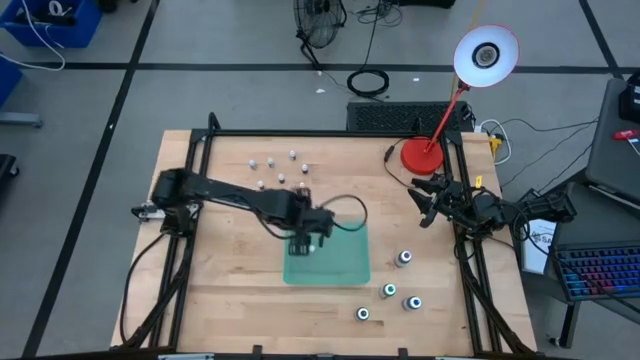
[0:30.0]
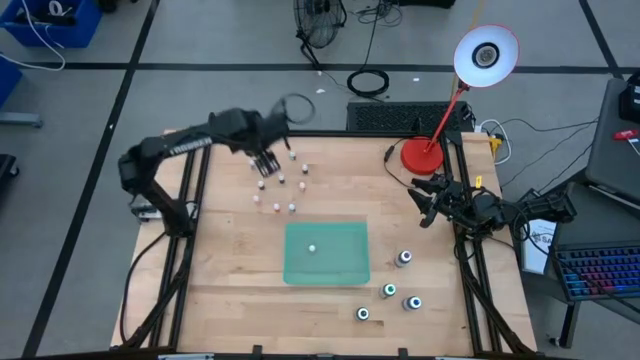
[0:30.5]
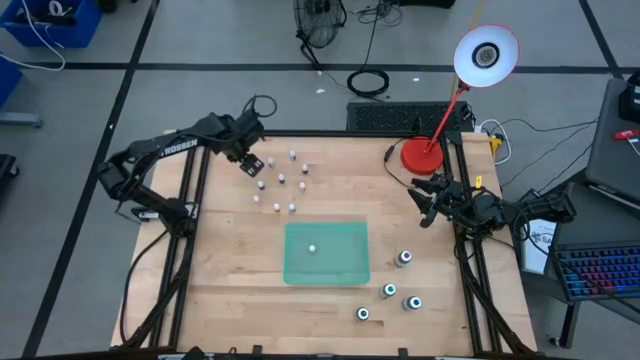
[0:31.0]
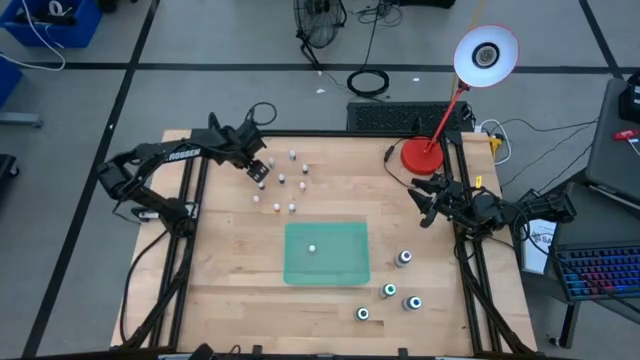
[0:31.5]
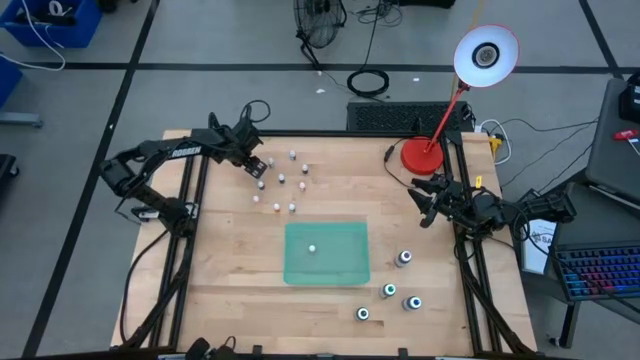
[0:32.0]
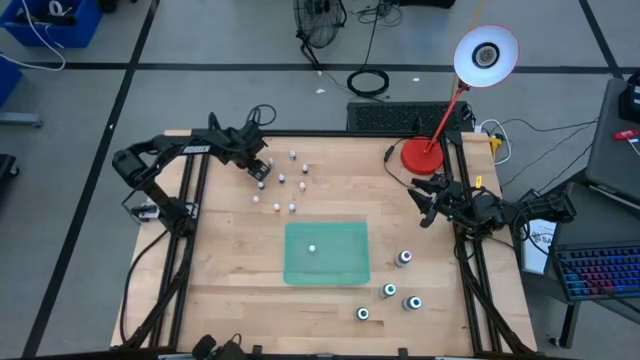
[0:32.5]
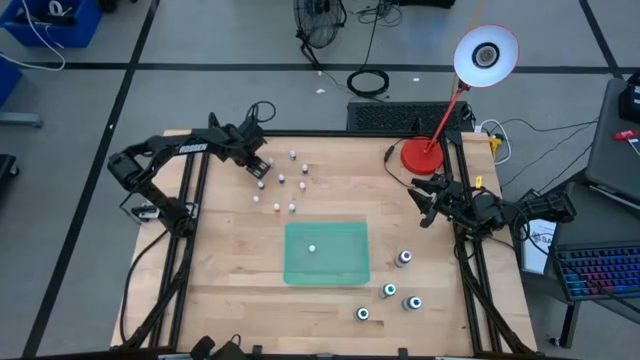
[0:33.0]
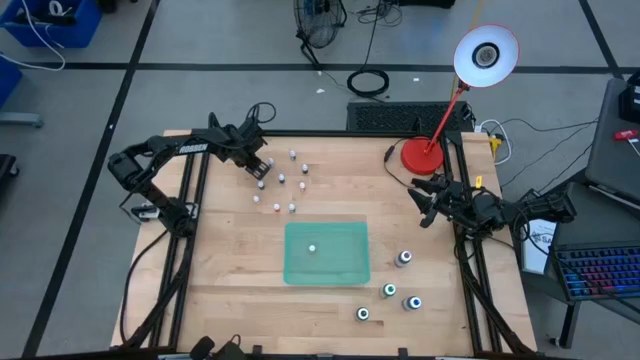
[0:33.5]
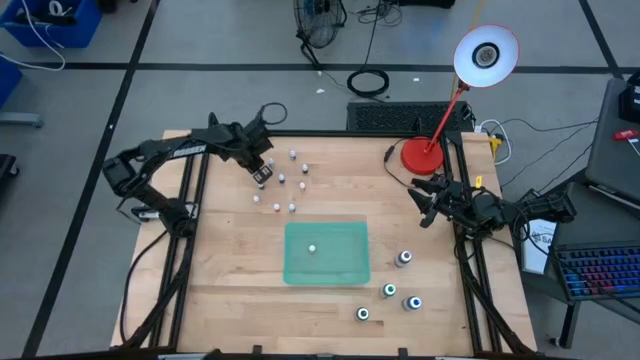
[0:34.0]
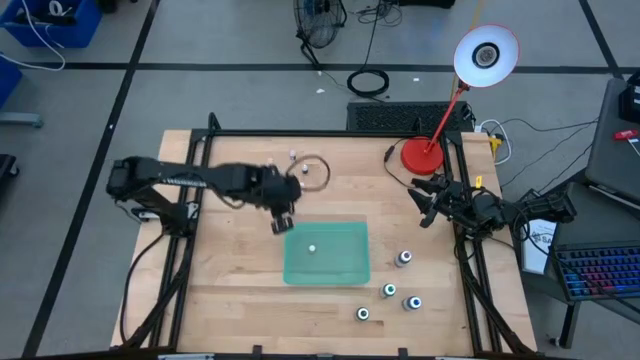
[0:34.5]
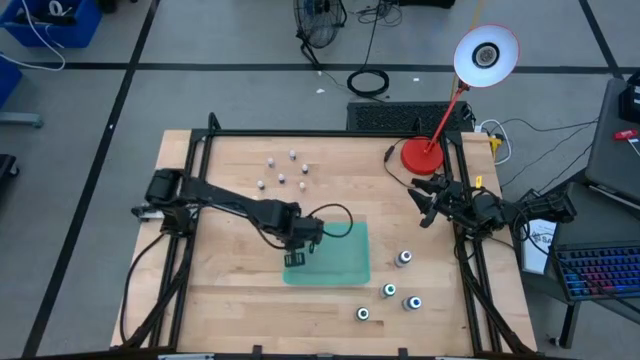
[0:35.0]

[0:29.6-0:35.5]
Task: Pick & Place food coloring
Put the small green food coloring bottle into the blue bin

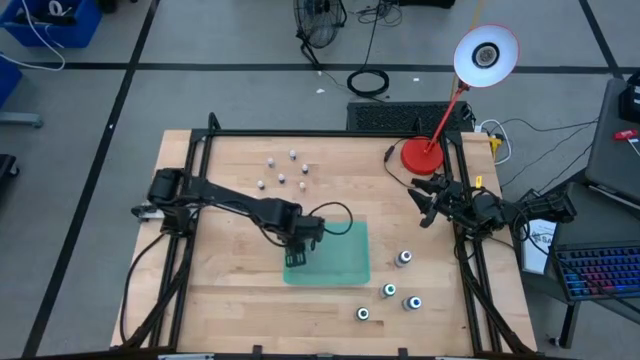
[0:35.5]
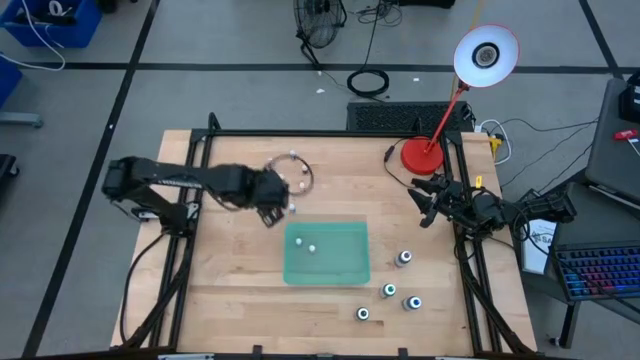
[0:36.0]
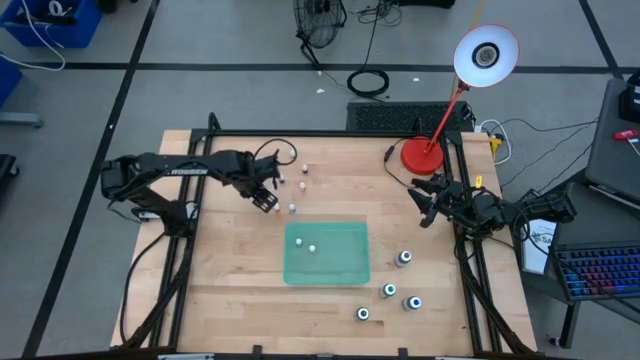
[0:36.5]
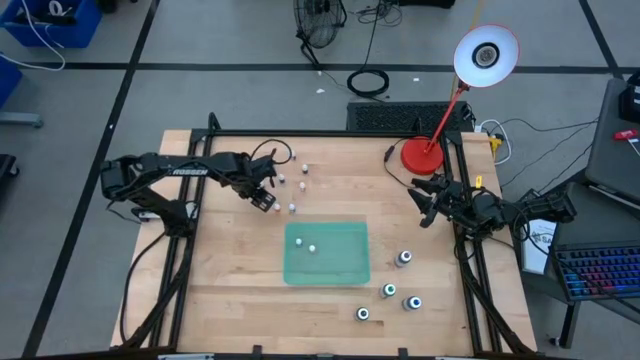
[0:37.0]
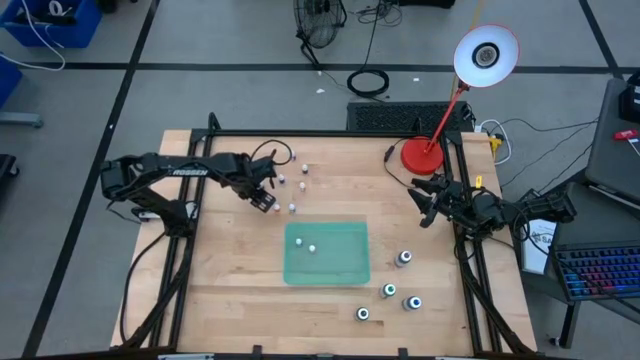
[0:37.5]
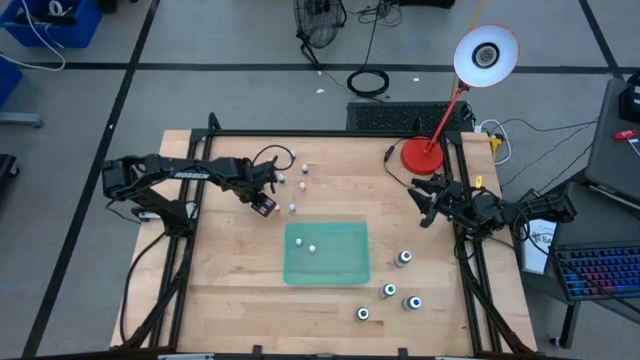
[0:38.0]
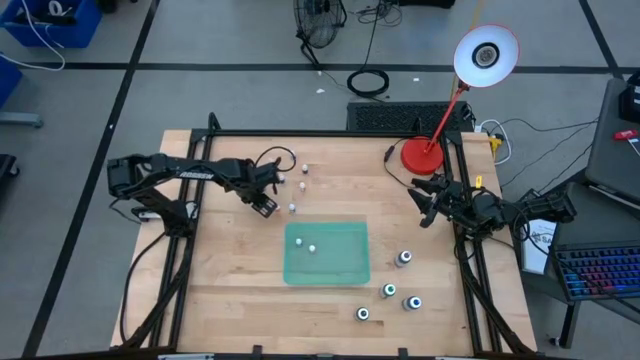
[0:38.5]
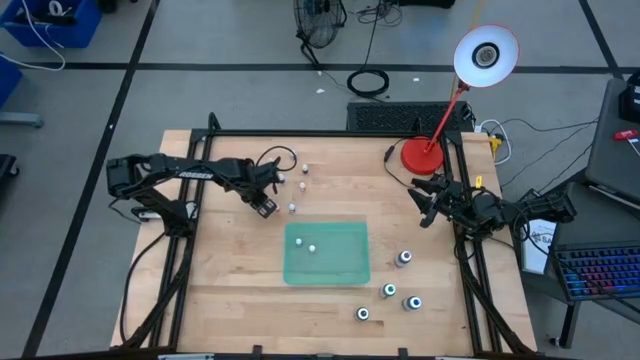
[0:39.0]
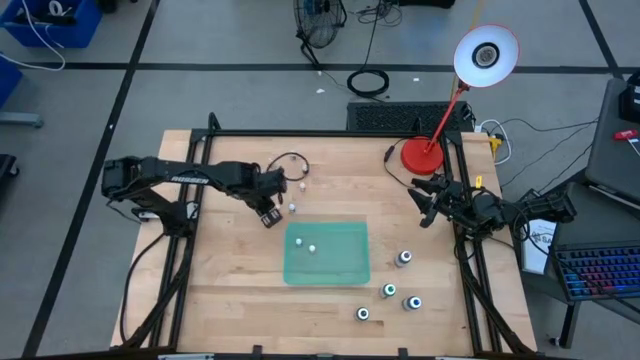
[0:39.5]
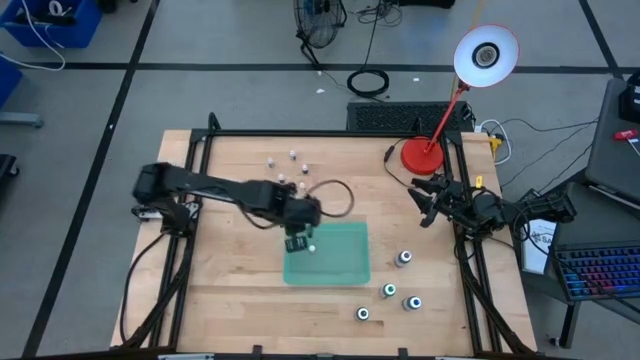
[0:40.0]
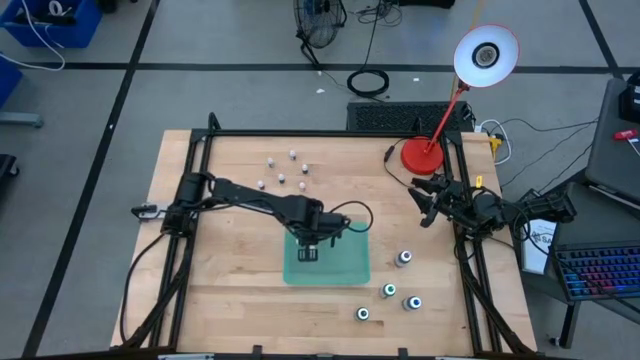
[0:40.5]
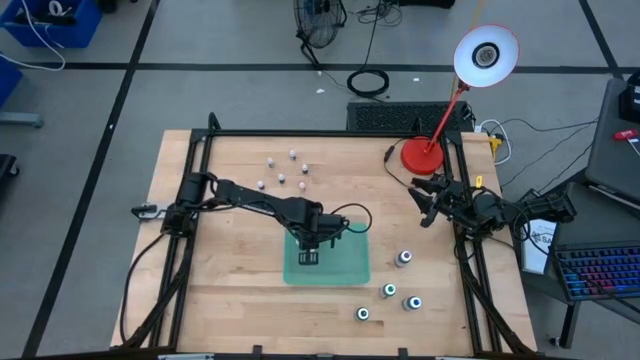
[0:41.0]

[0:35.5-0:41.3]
Put the small orange food coloring bottle into the blue bin

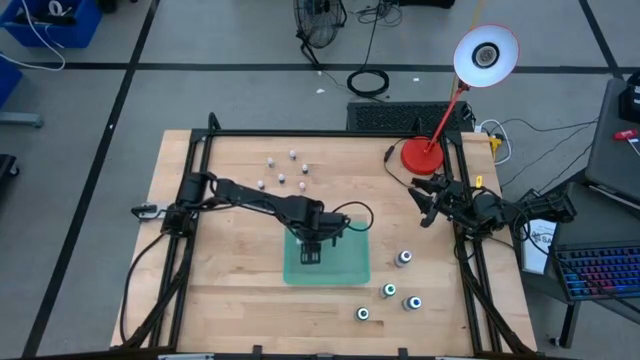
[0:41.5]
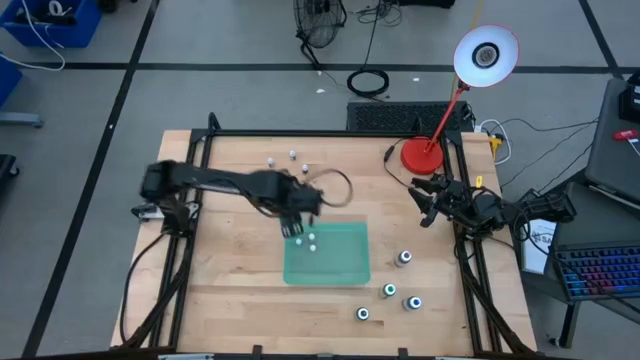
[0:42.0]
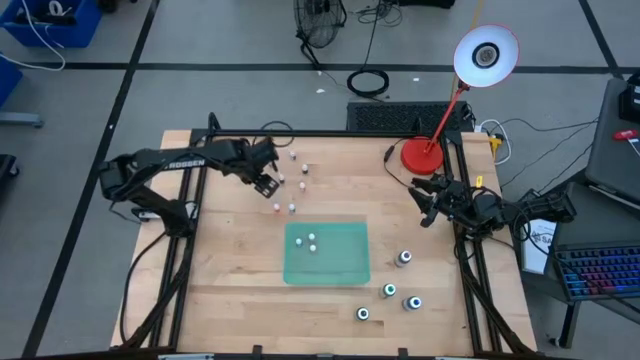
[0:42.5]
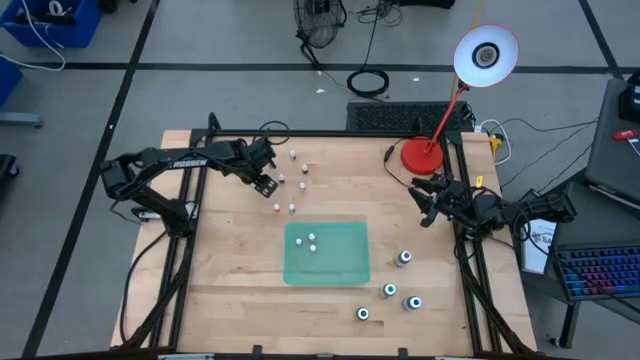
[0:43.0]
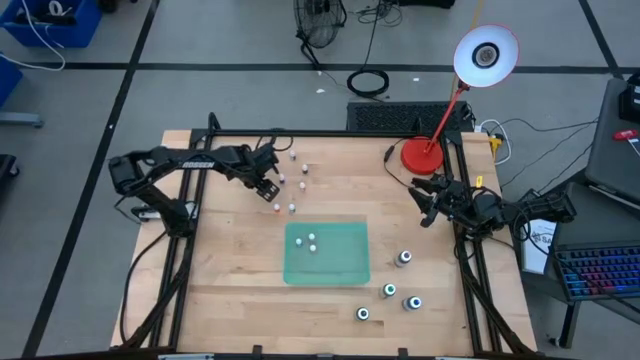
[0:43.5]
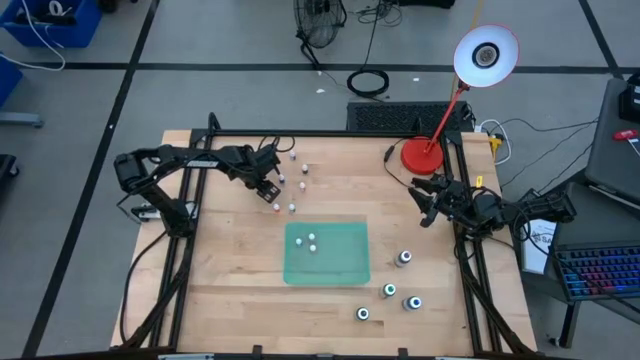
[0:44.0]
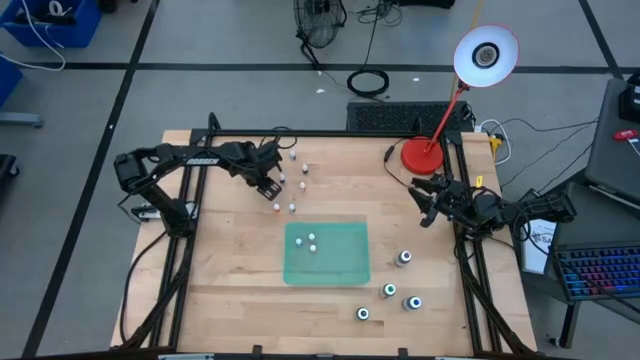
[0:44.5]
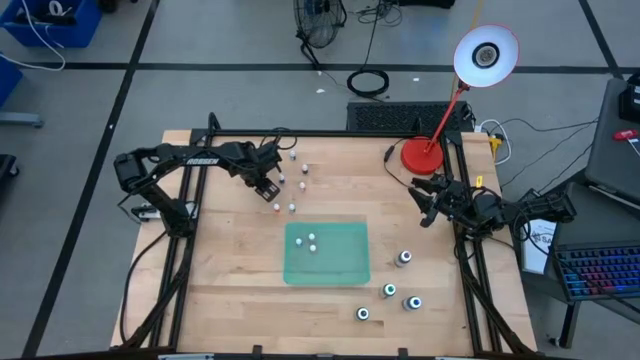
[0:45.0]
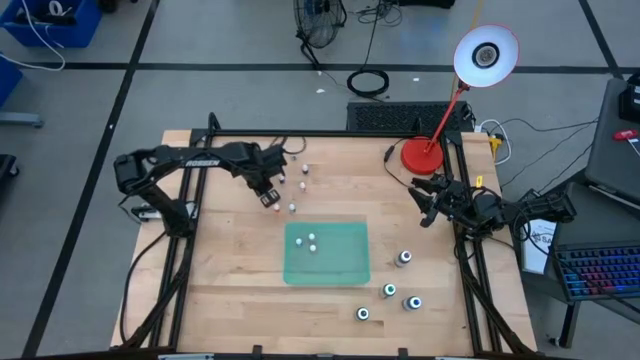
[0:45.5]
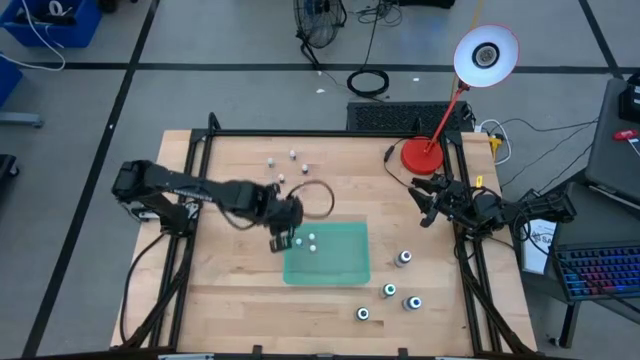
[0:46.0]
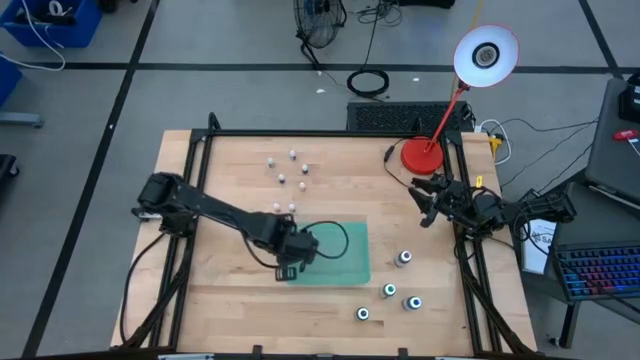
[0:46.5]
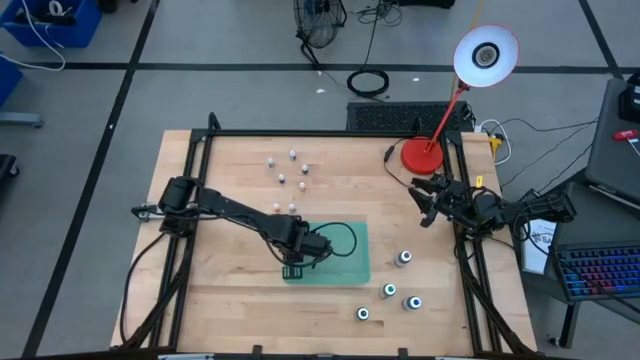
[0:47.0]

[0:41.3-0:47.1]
Put the small red food coloring bottle into the blue bin

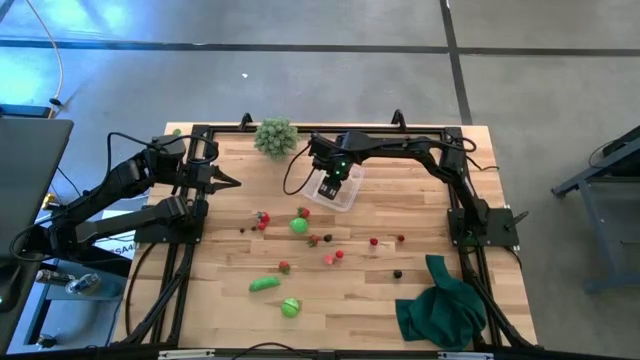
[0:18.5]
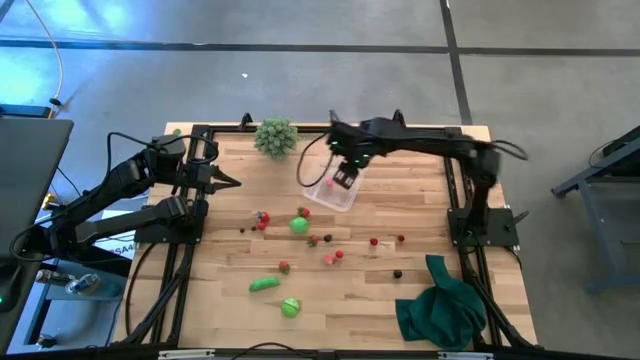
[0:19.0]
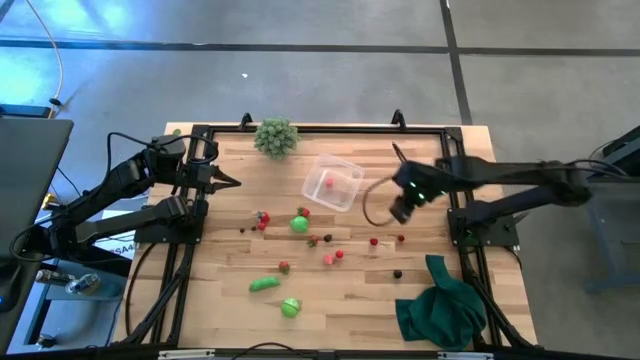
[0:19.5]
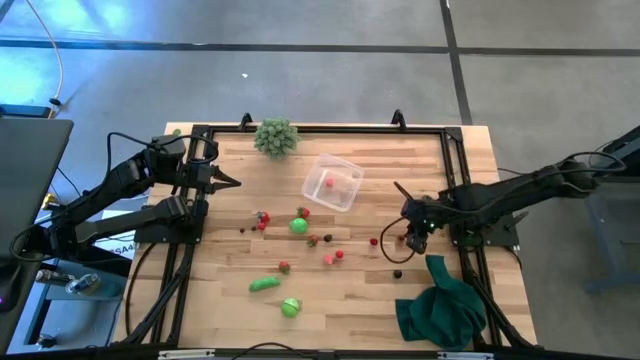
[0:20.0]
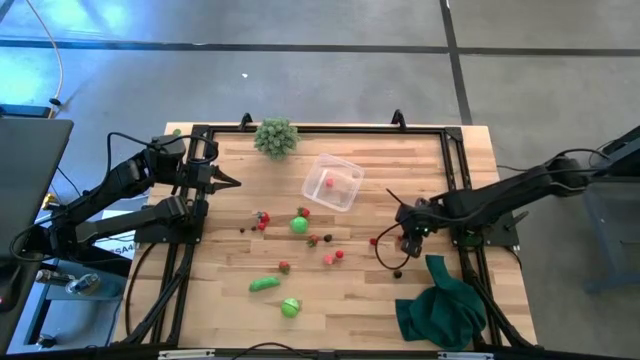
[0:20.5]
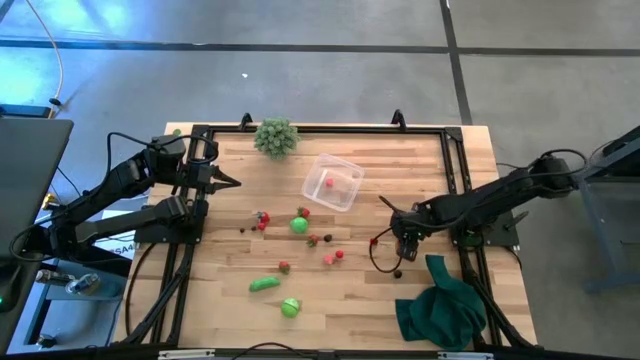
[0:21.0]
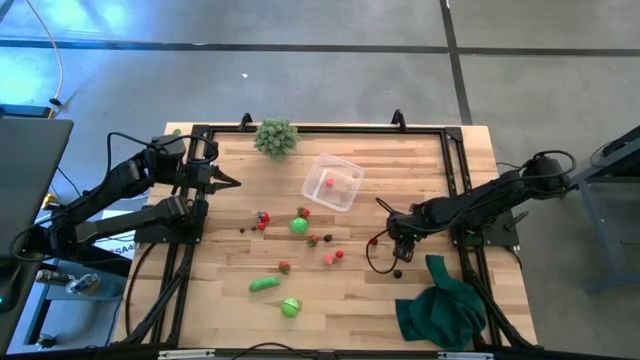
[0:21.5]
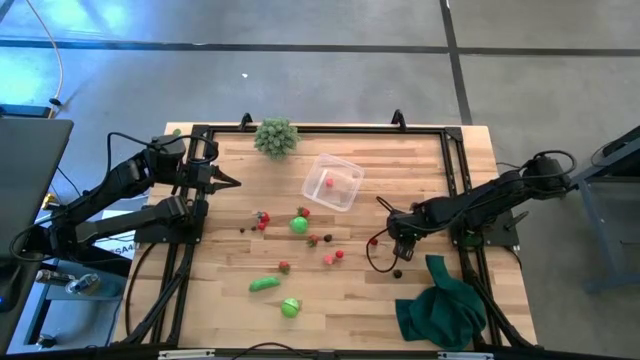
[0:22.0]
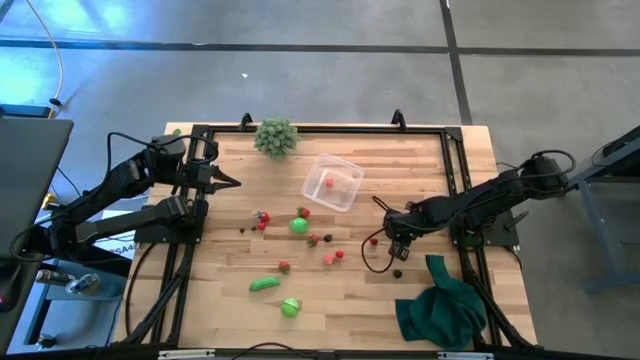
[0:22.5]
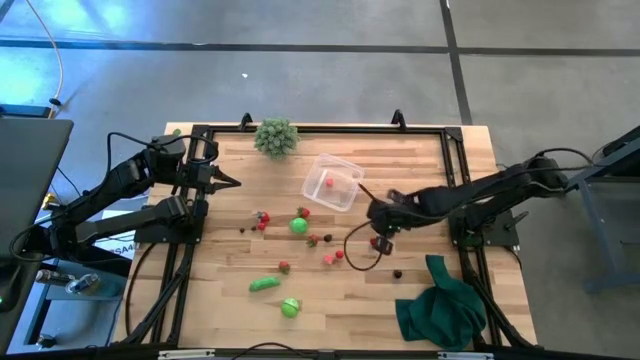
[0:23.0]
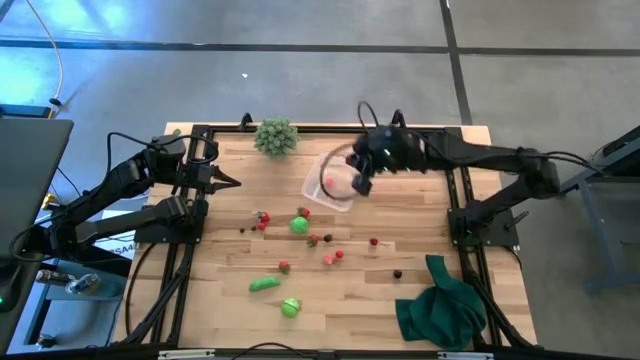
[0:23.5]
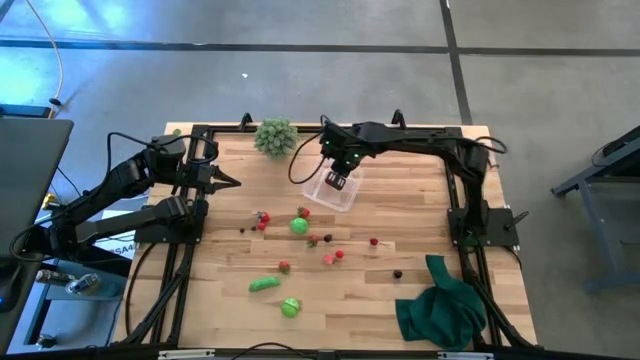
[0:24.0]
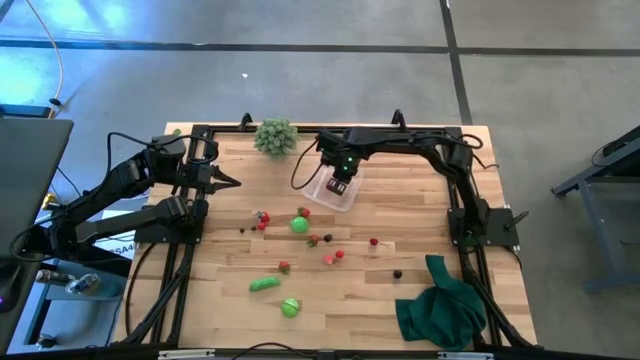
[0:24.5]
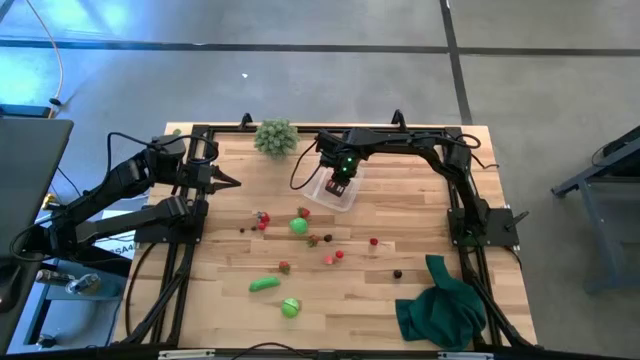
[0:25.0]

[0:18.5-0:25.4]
Task: Pick and placing Produce into tupperware
Put the red cherry into the transparent container
